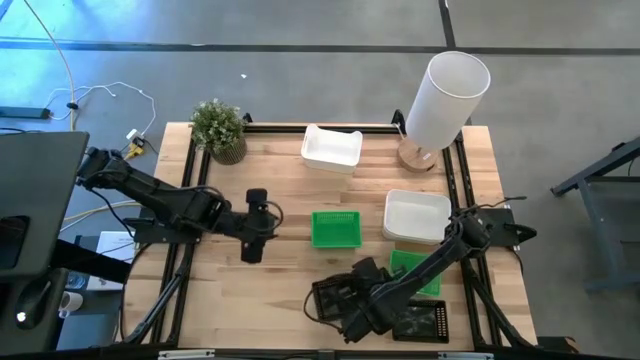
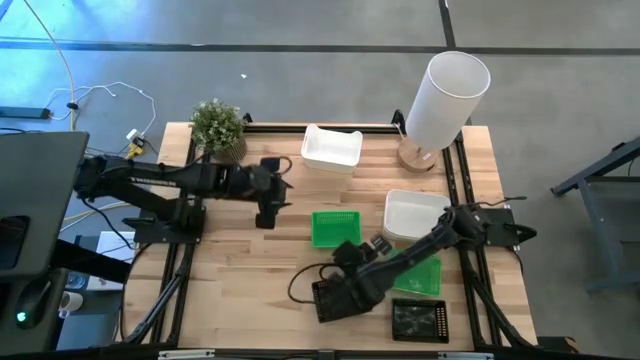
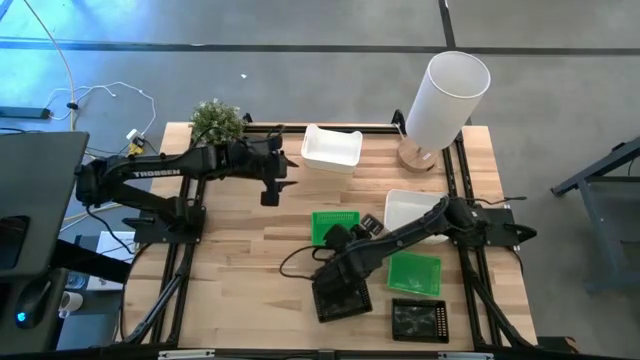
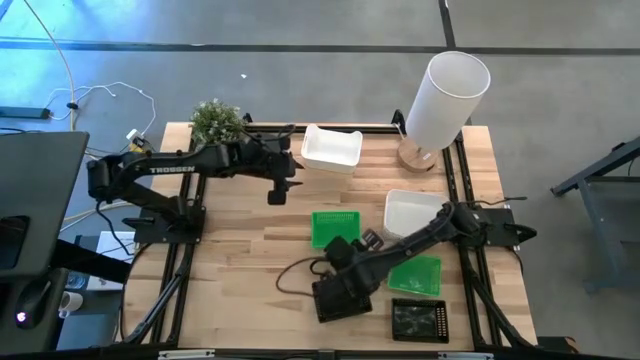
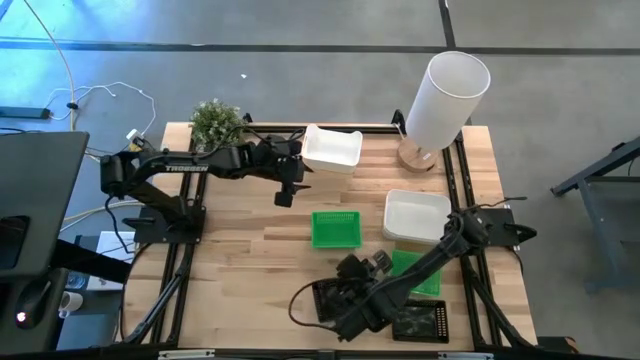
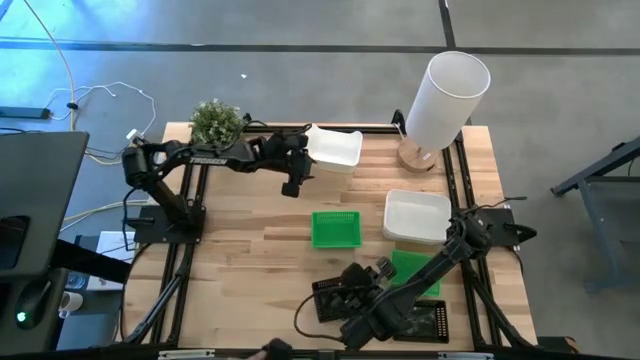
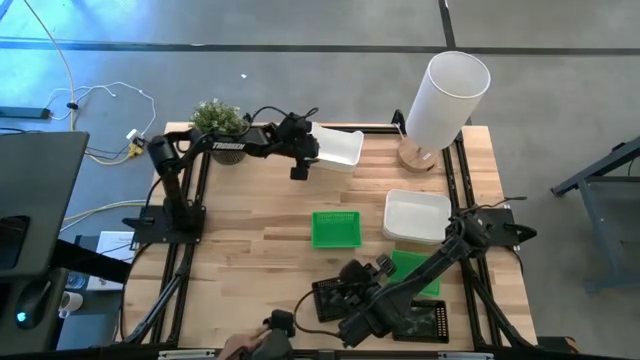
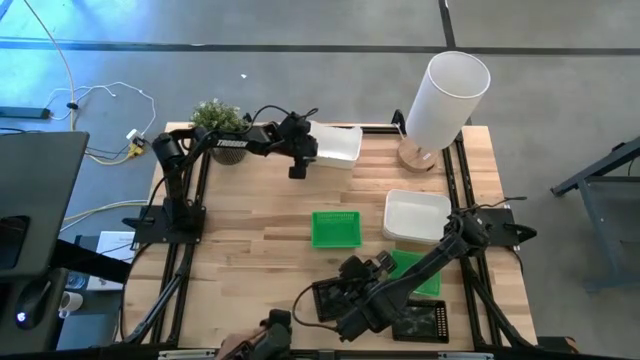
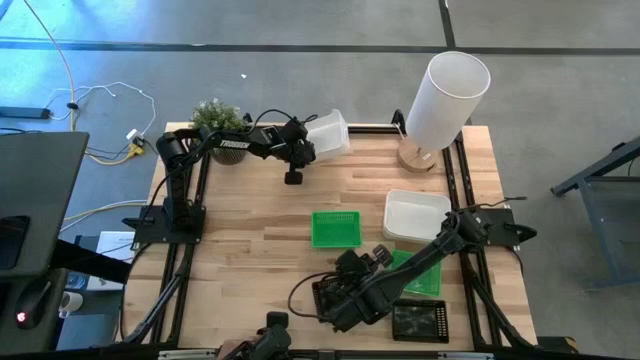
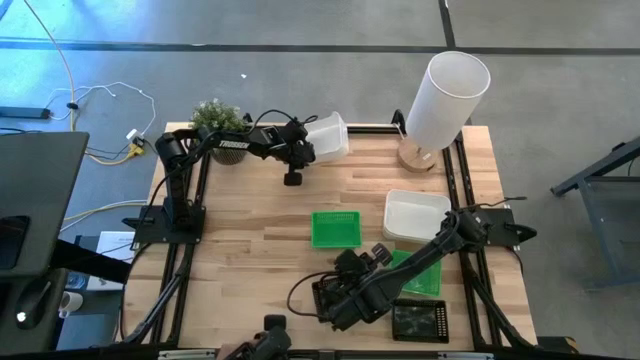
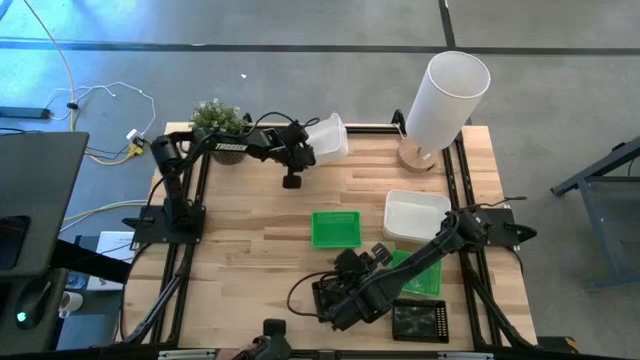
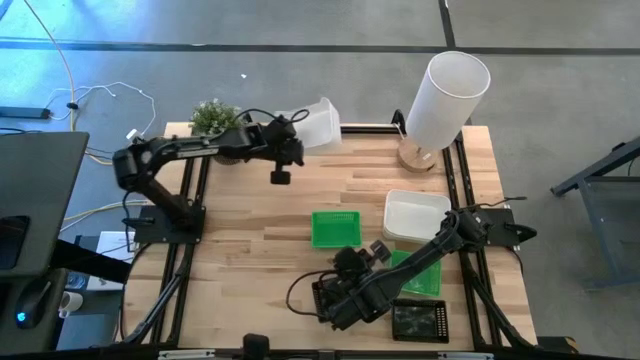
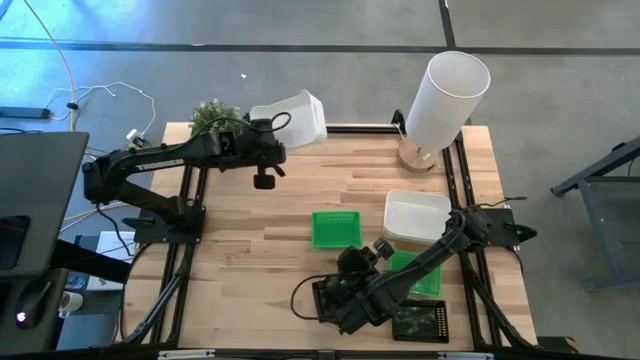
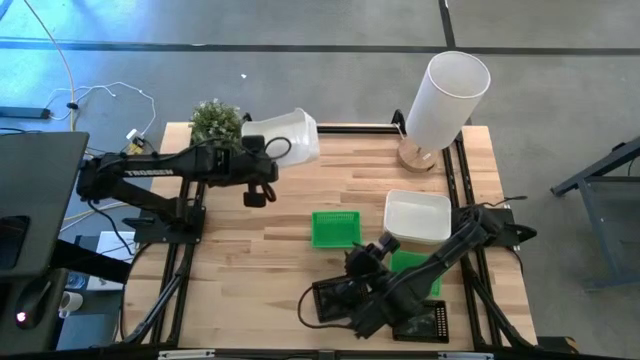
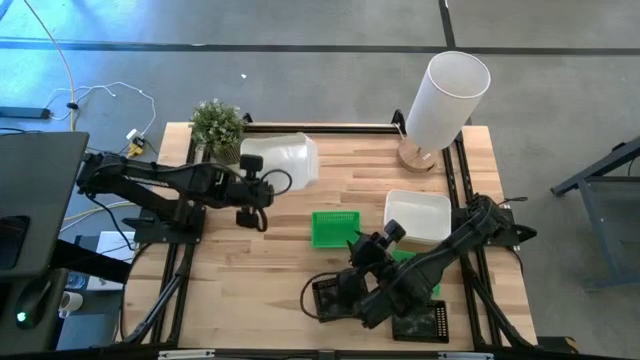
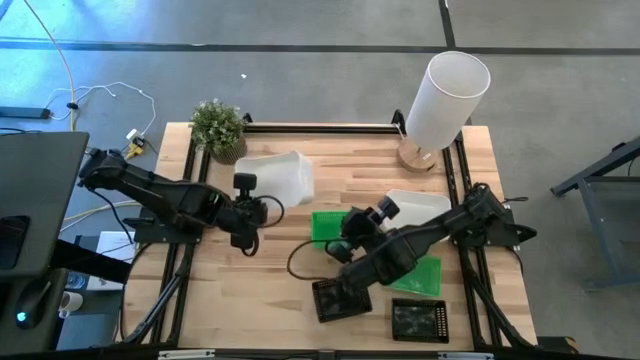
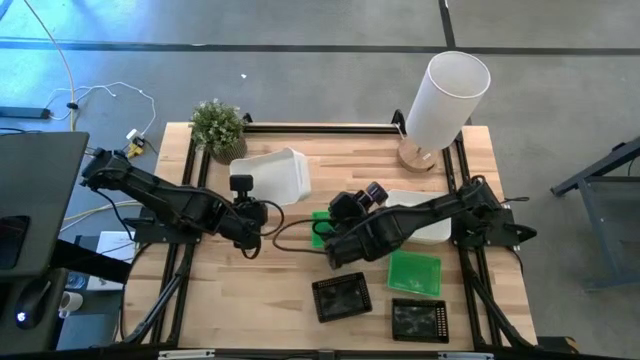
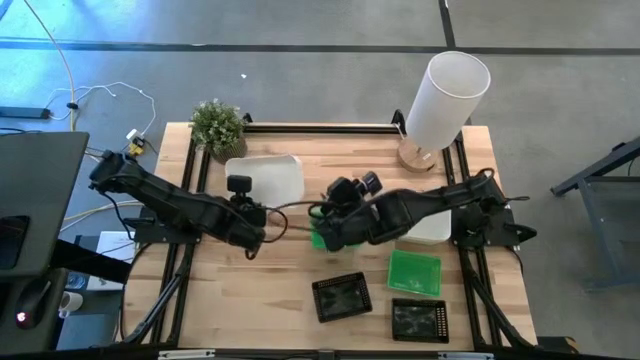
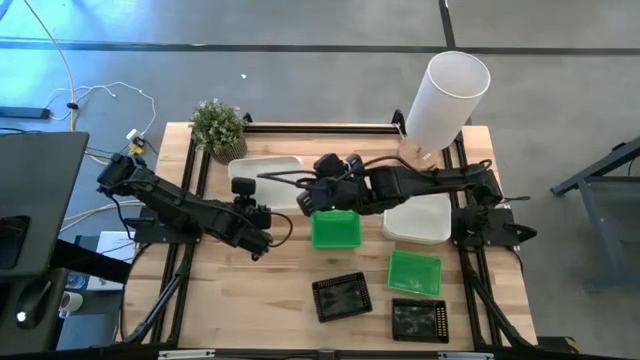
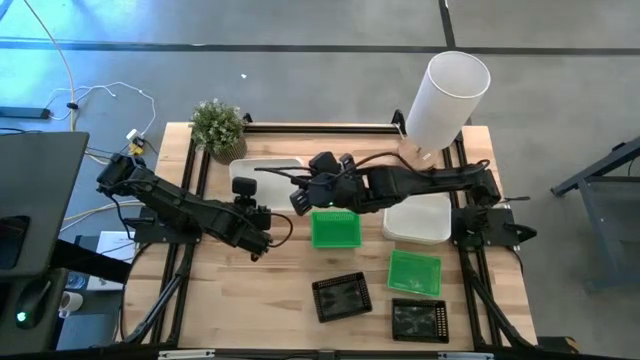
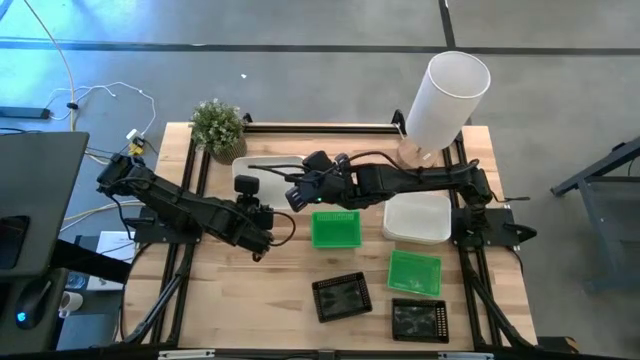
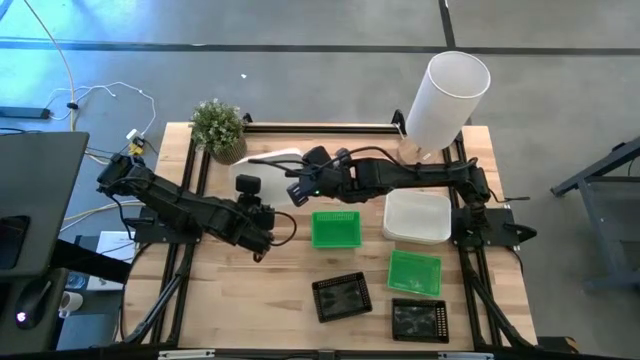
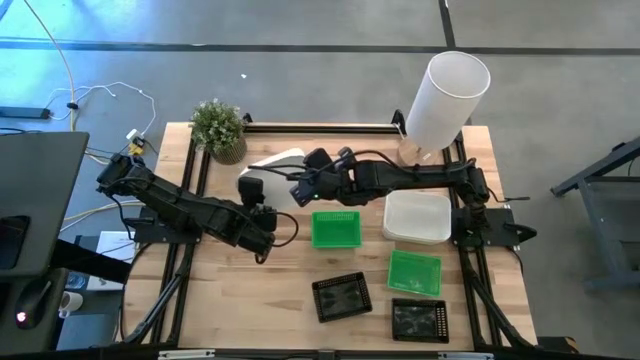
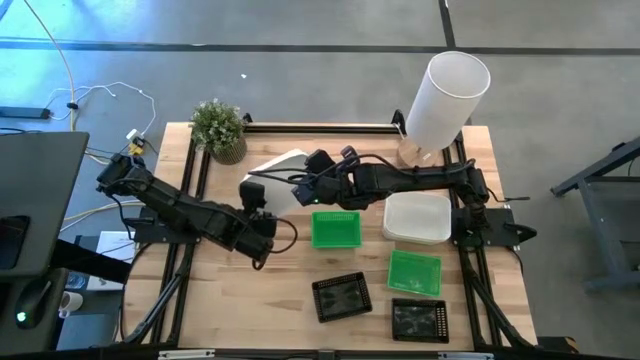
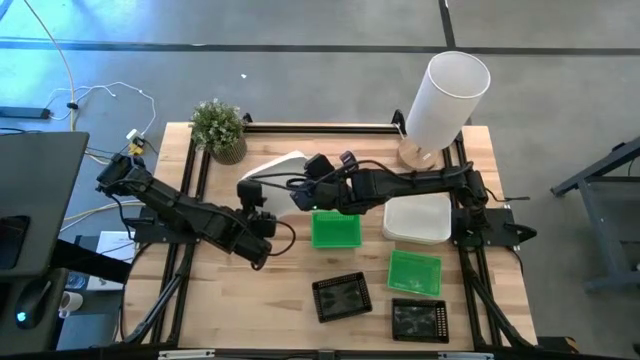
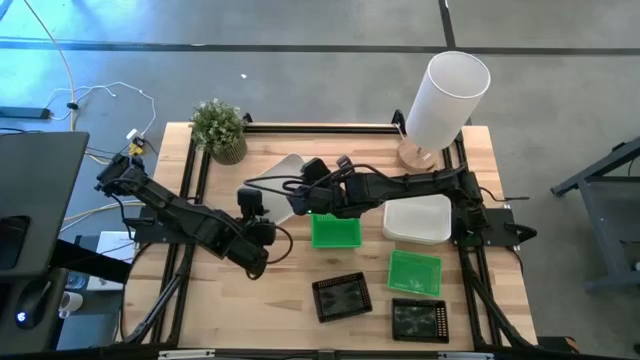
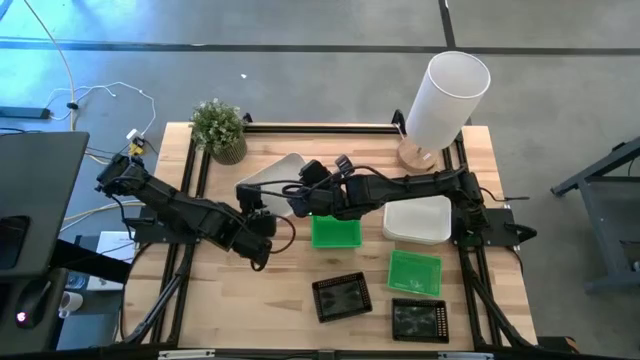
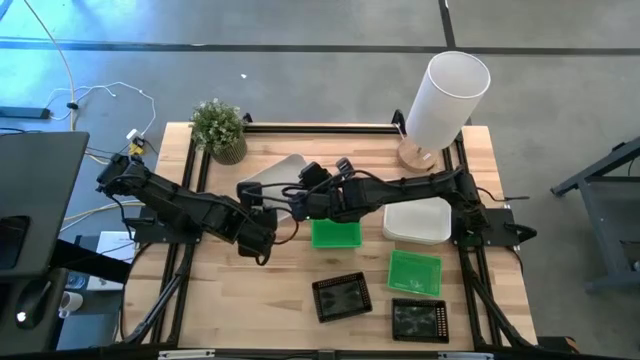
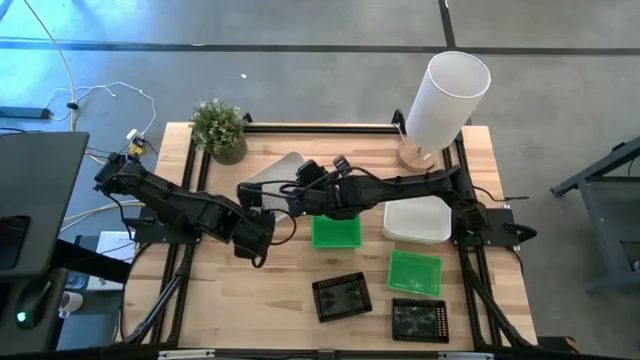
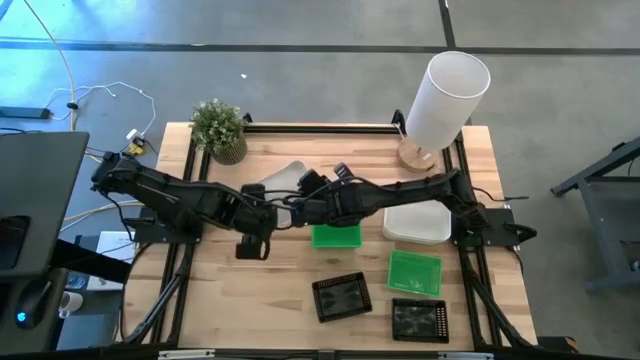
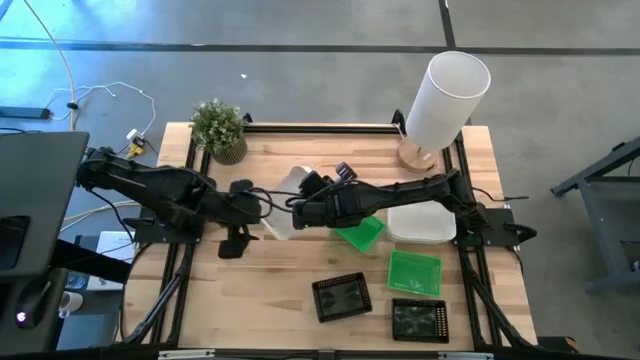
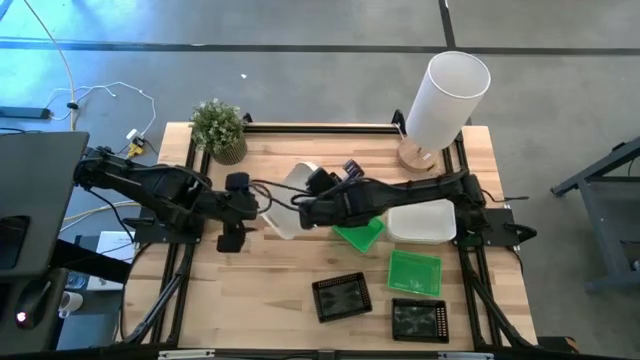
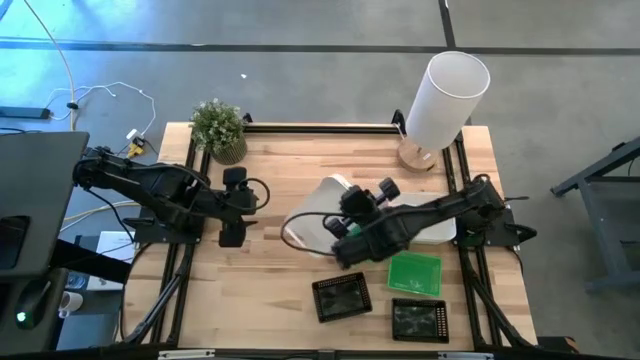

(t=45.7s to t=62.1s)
Stack the top white bin on the white bins
